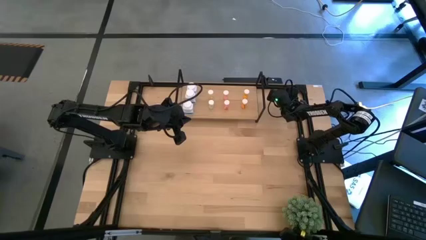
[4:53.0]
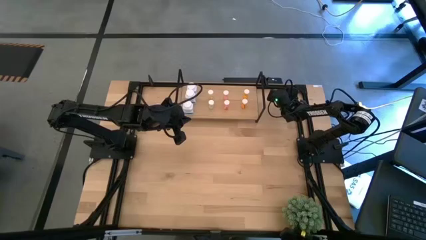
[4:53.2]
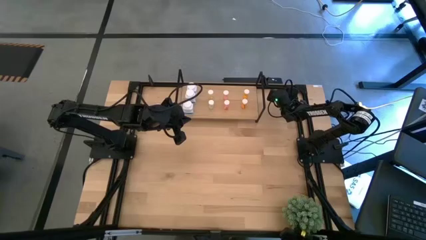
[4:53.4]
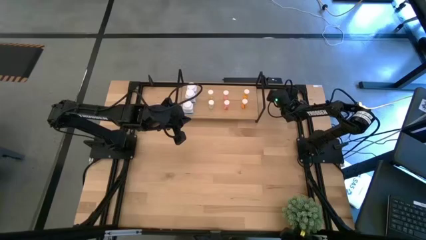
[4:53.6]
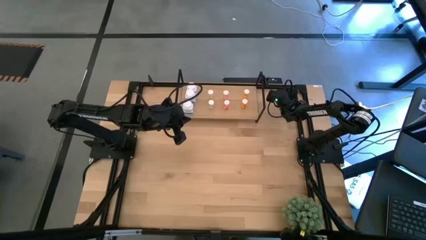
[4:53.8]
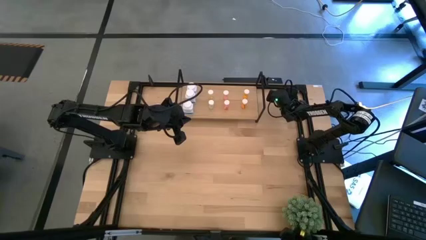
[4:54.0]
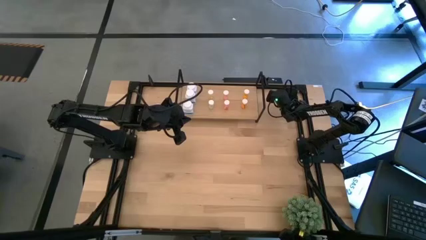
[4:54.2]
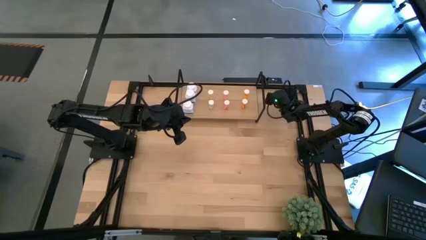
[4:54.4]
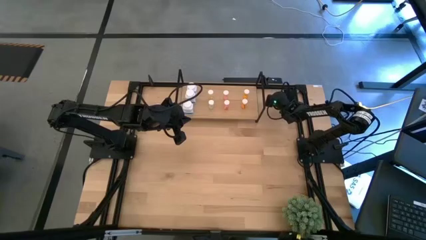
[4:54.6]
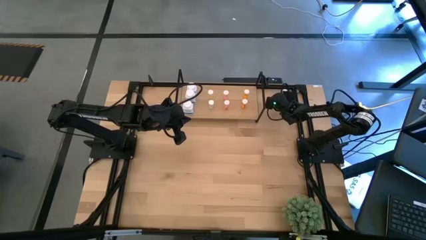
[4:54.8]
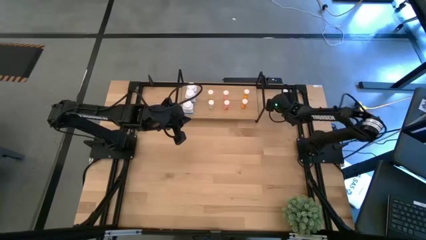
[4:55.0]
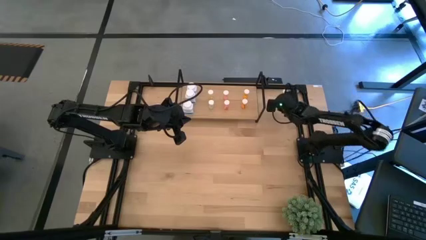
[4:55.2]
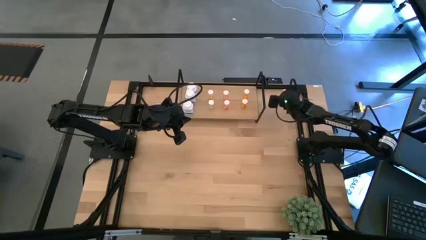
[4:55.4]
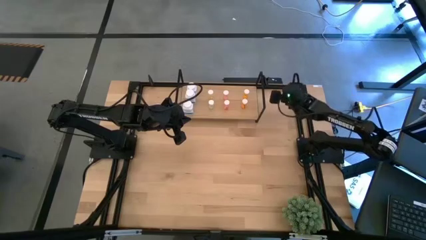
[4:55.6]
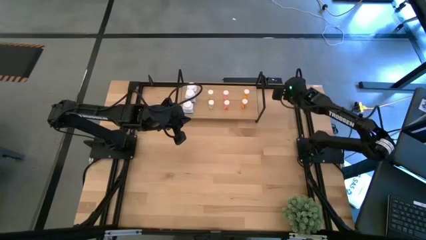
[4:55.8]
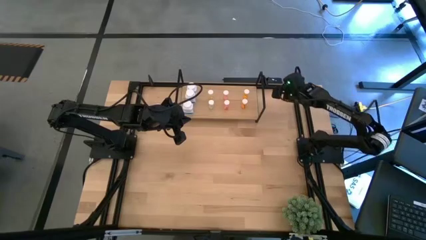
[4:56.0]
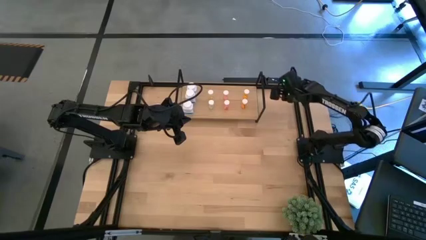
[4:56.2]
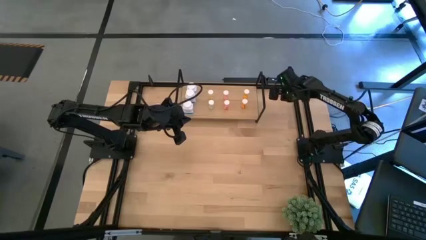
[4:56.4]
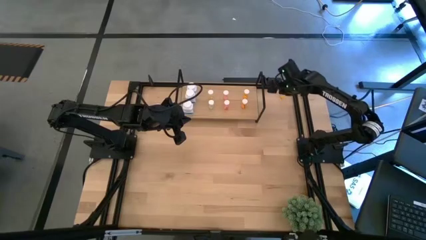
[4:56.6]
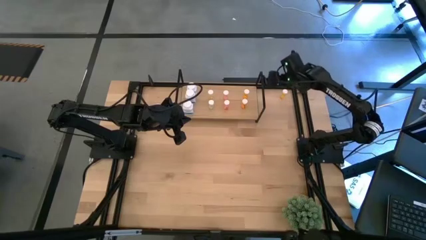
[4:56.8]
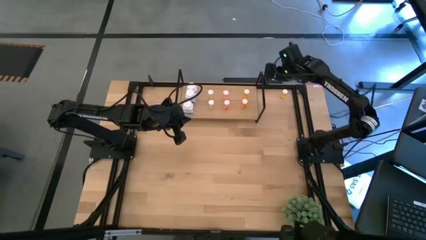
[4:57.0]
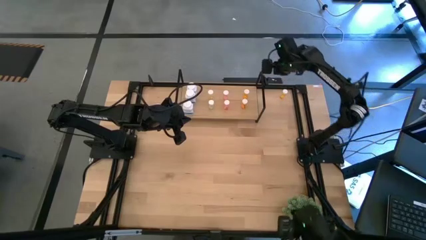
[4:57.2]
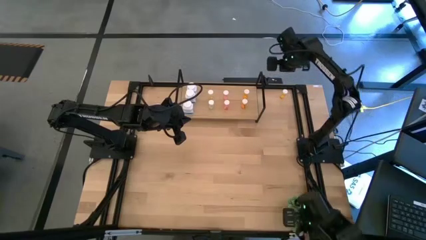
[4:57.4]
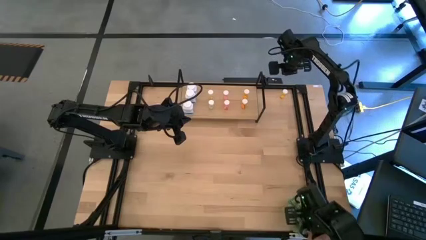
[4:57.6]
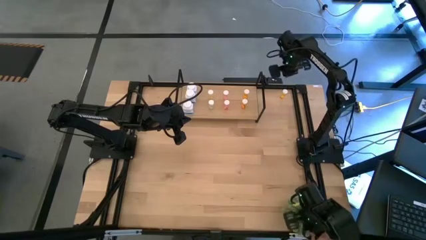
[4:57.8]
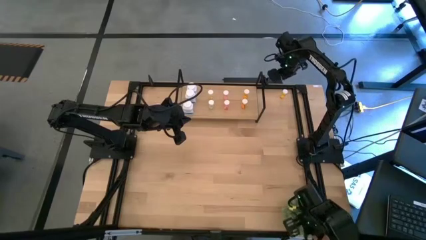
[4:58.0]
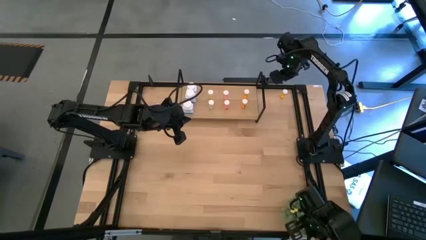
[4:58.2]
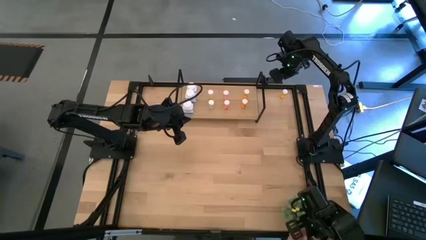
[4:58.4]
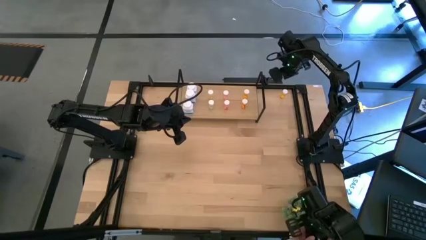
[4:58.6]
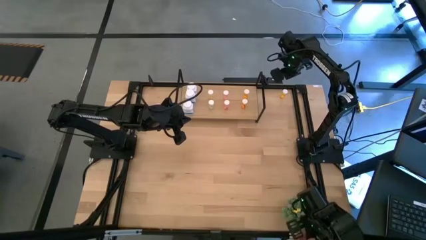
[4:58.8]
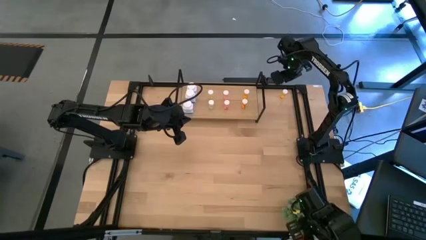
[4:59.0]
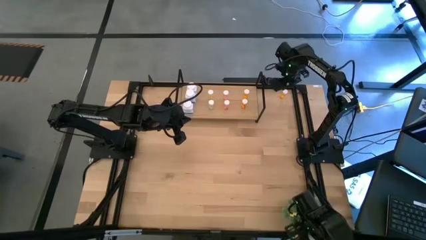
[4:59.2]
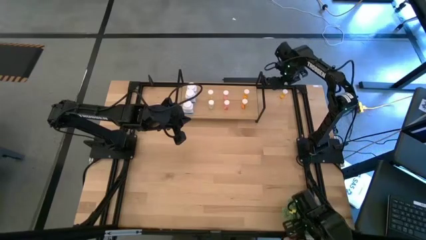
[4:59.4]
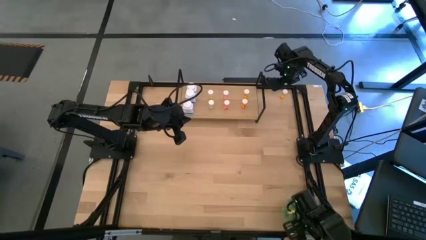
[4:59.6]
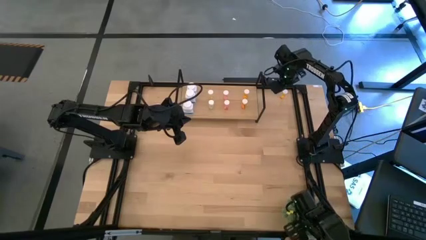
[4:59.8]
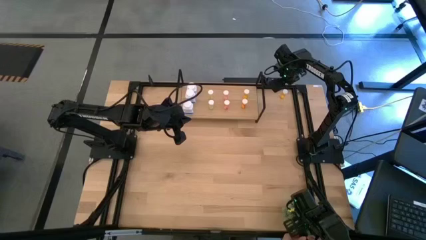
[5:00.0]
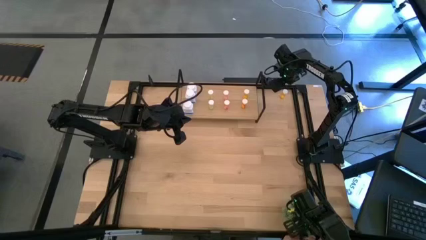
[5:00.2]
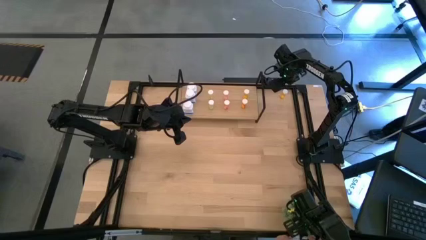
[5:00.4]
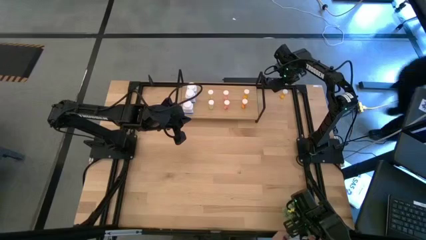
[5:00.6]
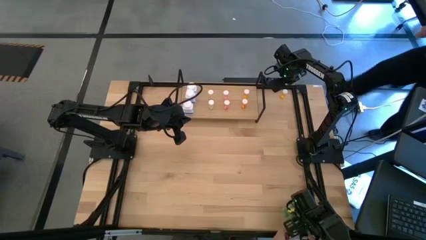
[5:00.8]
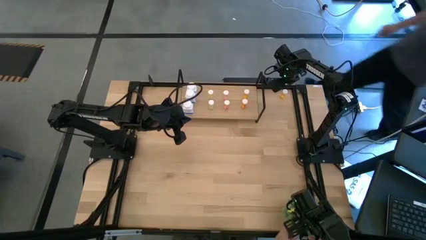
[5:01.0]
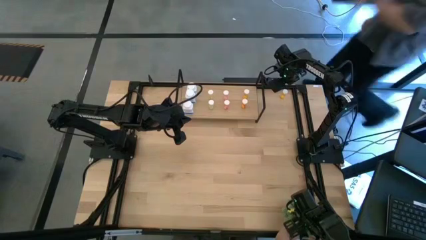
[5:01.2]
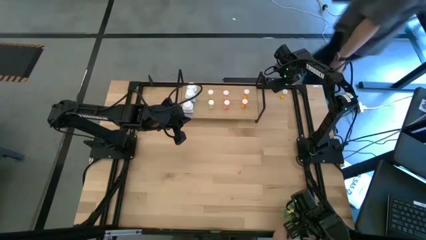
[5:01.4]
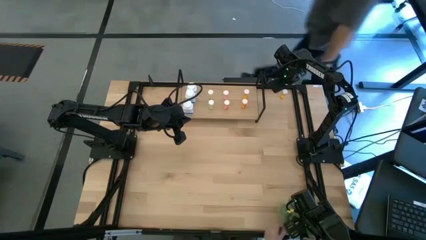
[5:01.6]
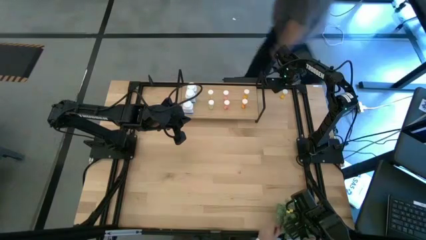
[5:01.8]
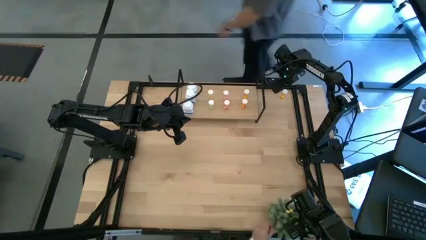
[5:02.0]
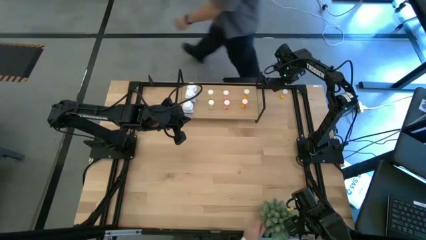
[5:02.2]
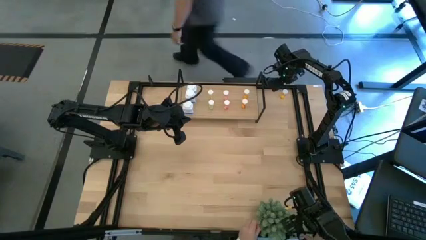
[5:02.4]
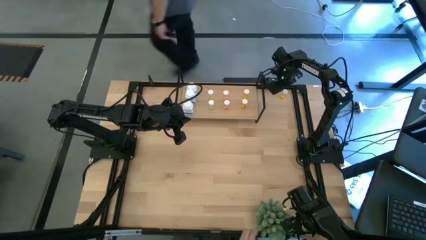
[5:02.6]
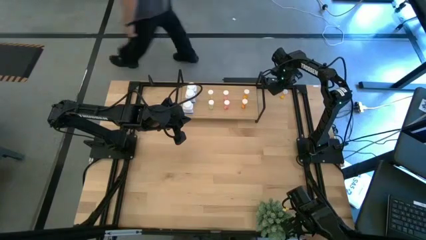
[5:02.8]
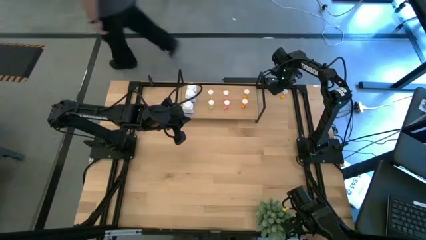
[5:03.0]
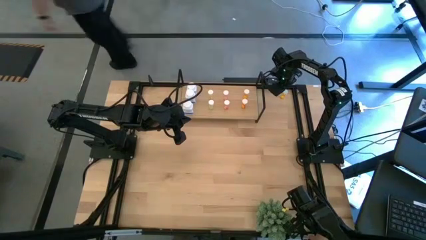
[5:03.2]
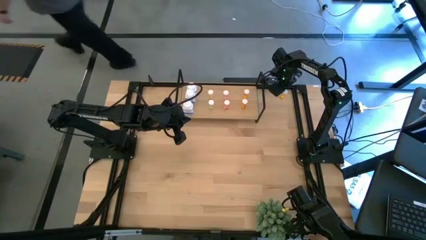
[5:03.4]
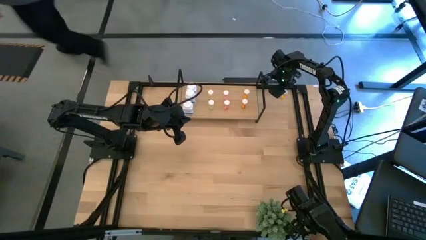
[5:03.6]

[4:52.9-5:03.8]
Task: Pick and place medicine bottles onto shelf by color
Put the orange pill bottle on the shelf aligned with the other orange pill bottles
